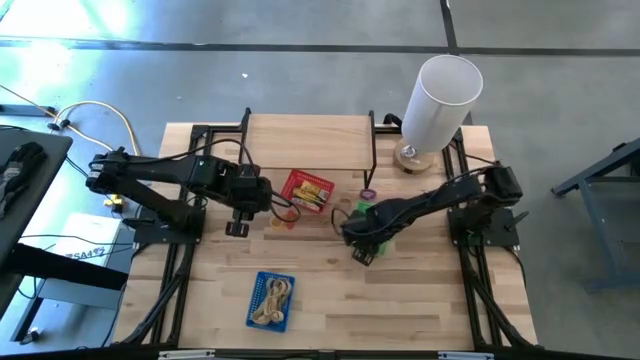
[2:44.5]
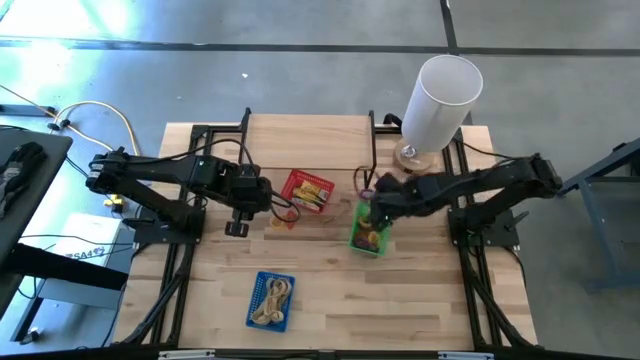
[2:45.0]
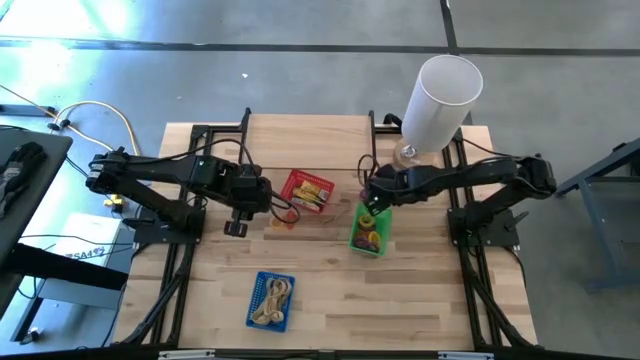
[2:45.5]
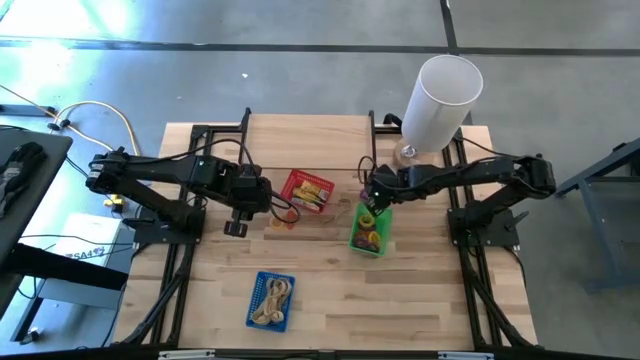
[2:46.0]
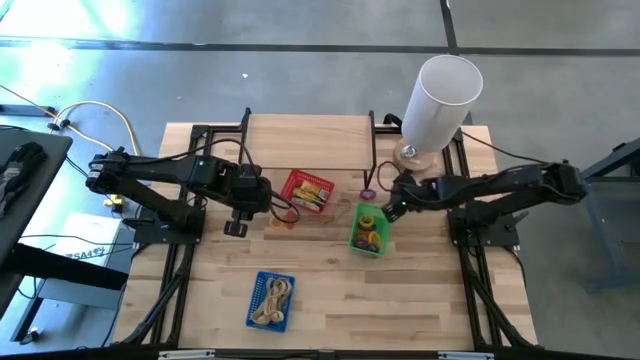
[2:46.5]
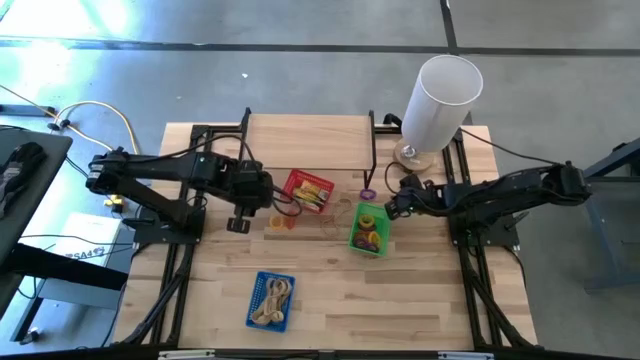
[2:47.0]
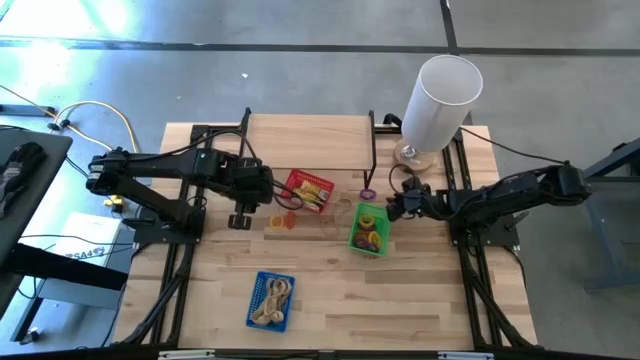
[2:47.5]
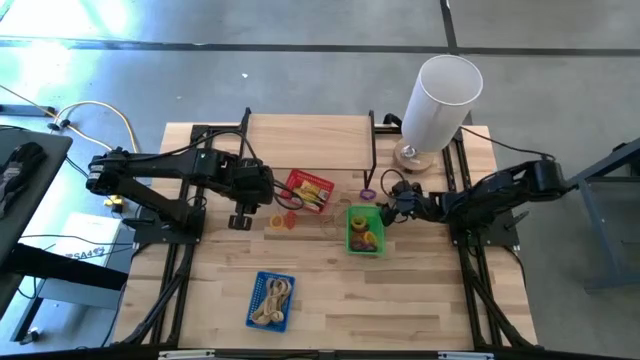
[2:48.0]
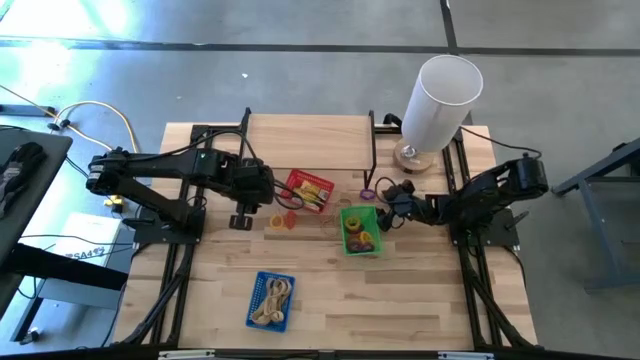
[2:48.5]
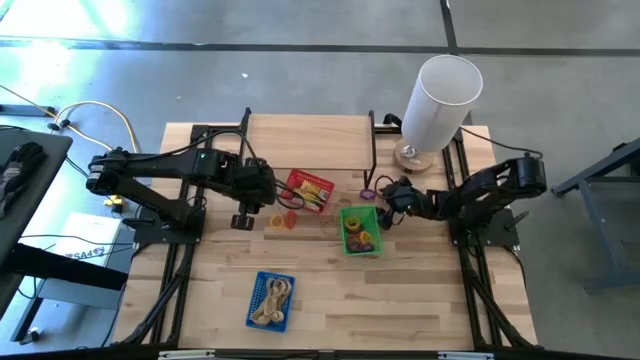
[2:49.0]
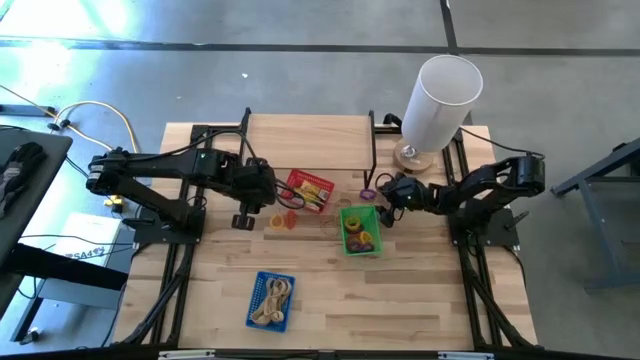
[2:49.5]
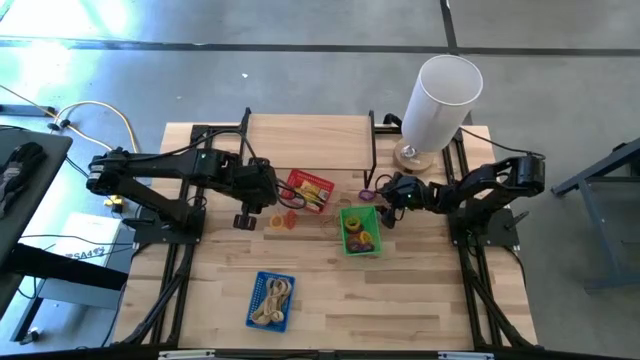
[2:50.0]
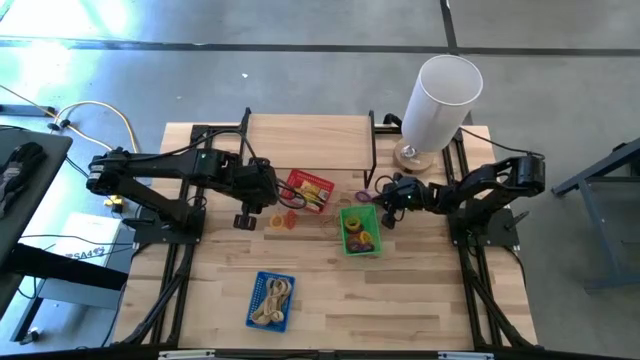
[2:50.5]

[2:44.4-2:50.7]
Task: Pick & Place Office Desk Supplies
Put the violet spring keychain into the green bin

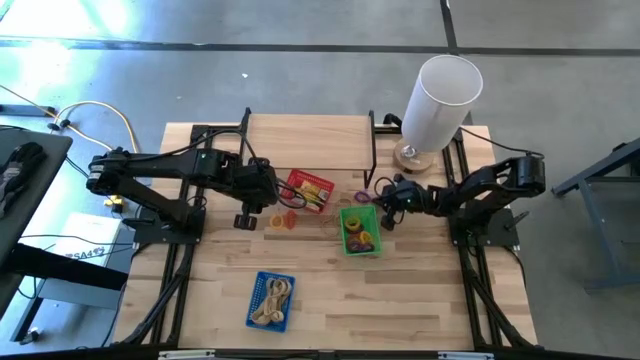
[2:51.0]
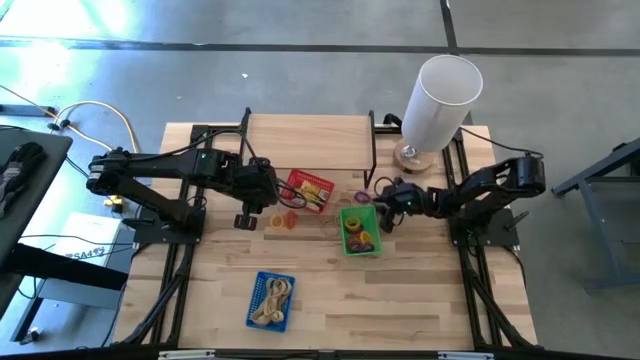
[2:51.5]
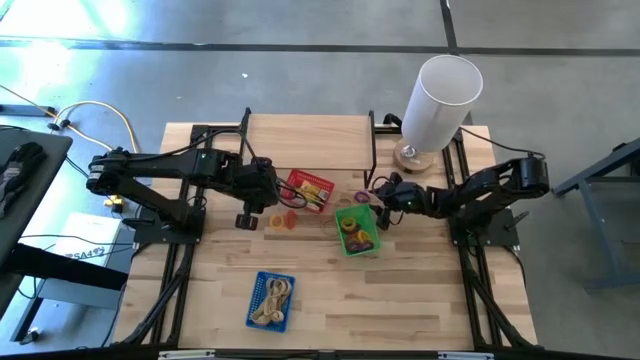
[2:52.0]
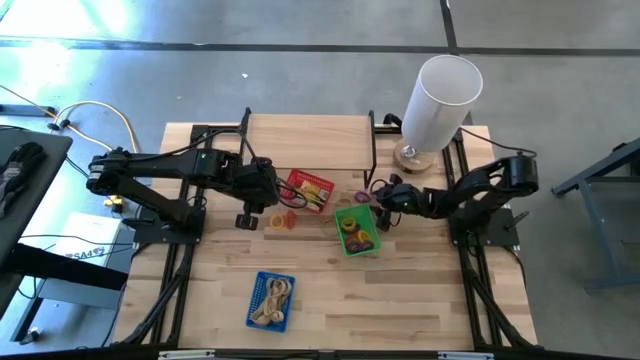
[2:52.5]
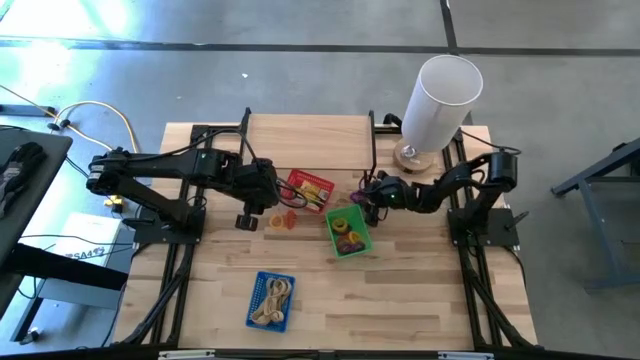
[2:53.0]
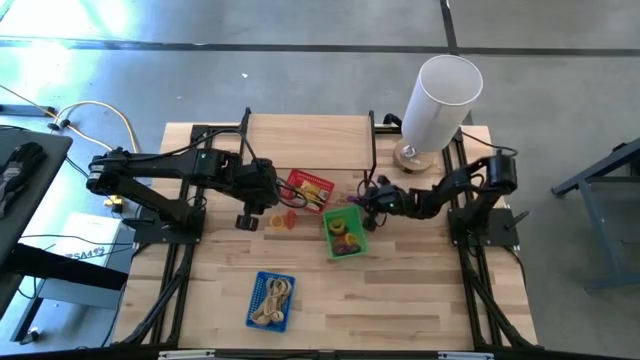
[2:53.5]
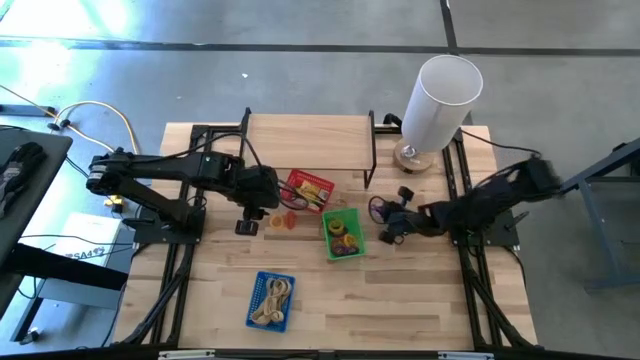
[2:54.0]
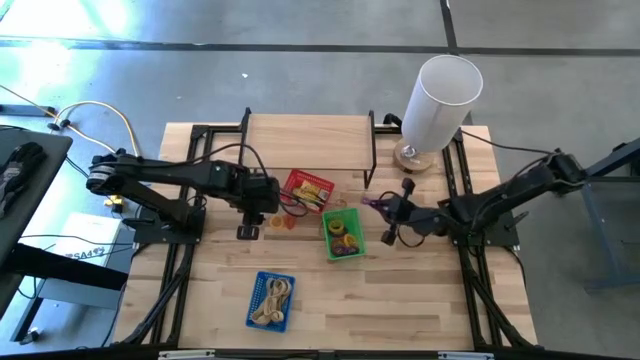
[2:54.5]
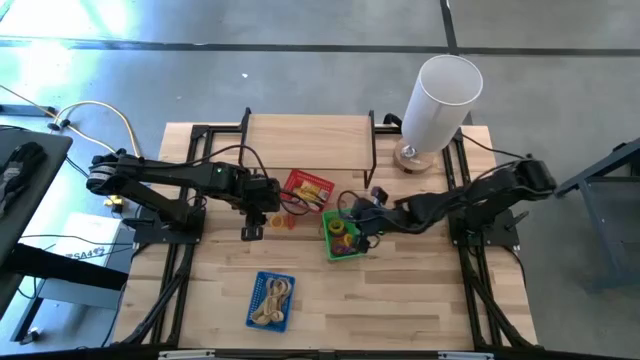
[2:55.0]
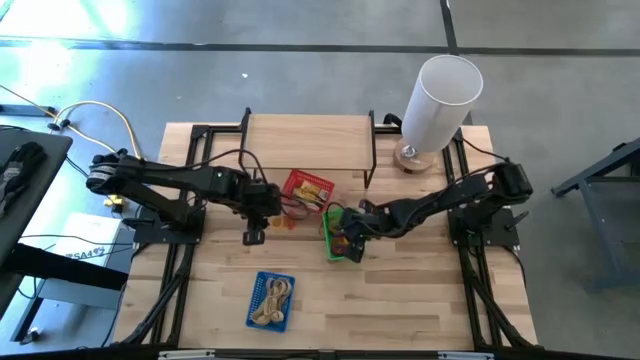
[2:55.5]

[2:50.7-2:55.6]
Put the violet spring keychain into the green bin

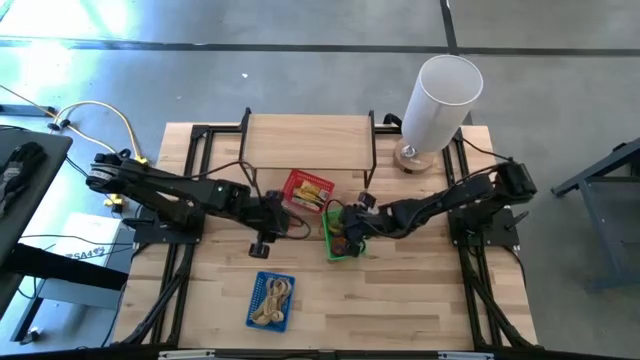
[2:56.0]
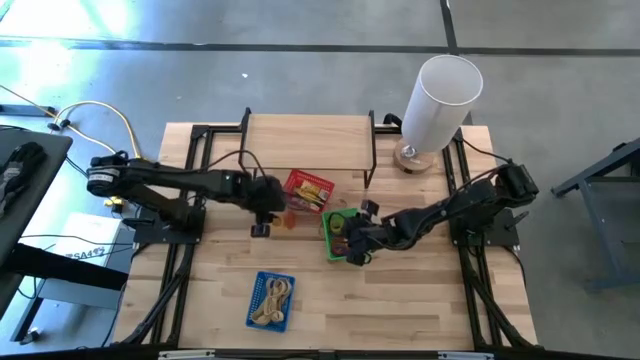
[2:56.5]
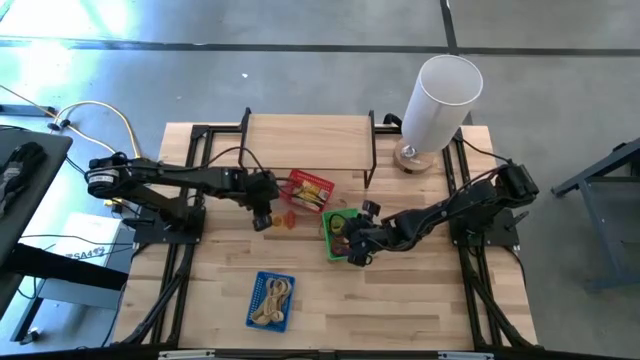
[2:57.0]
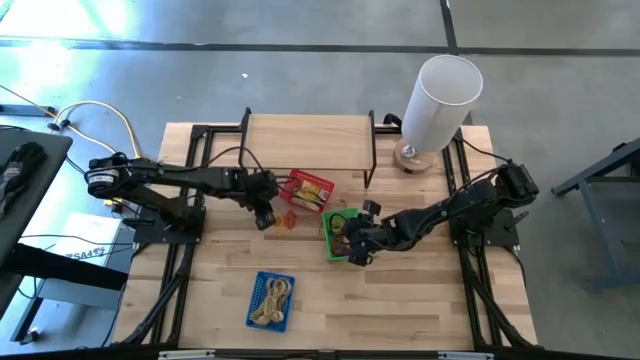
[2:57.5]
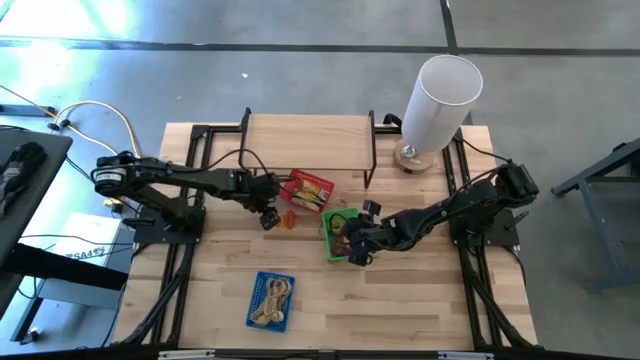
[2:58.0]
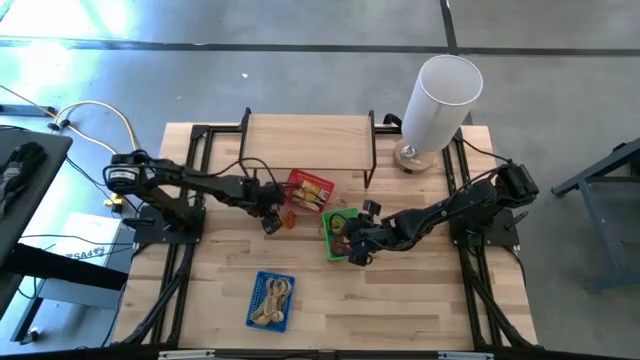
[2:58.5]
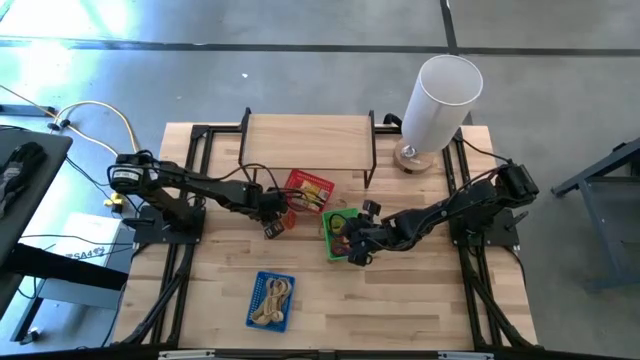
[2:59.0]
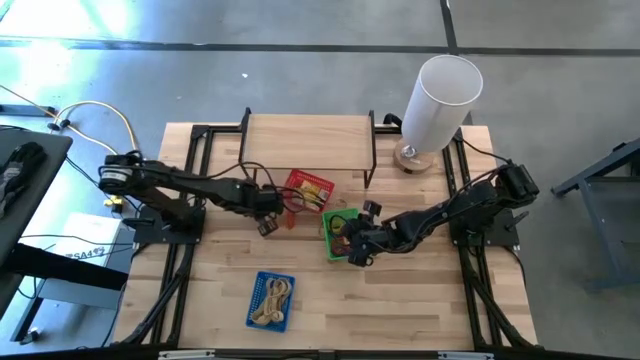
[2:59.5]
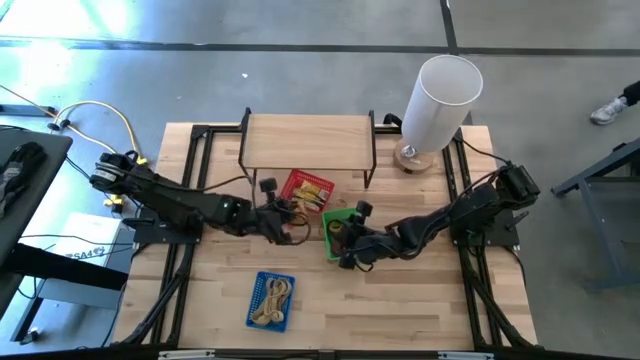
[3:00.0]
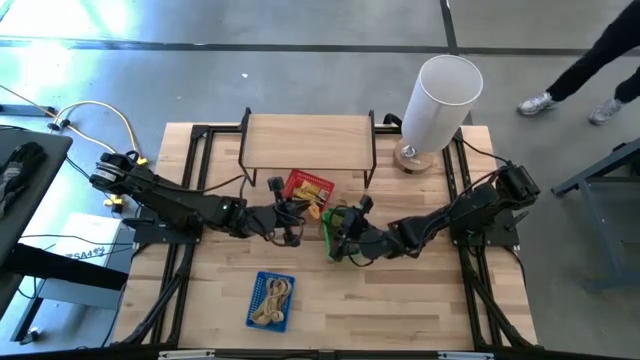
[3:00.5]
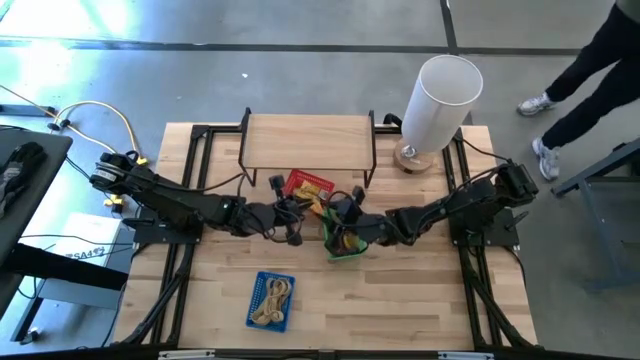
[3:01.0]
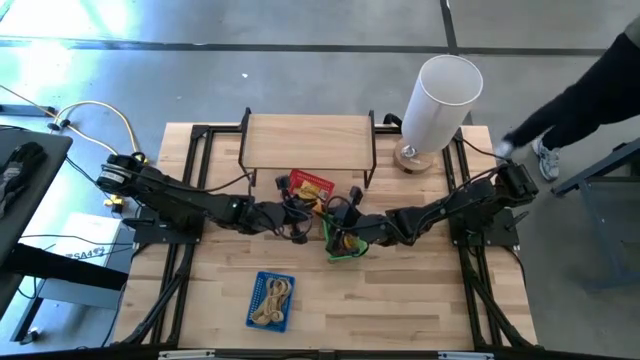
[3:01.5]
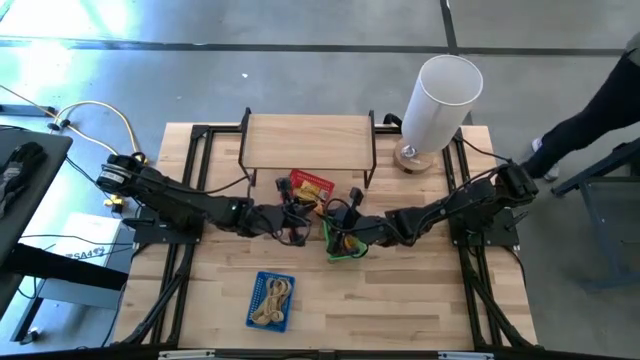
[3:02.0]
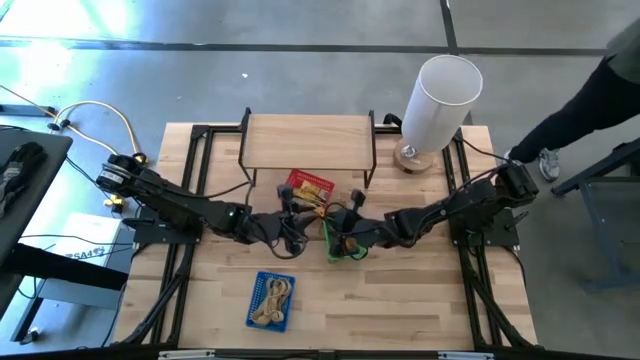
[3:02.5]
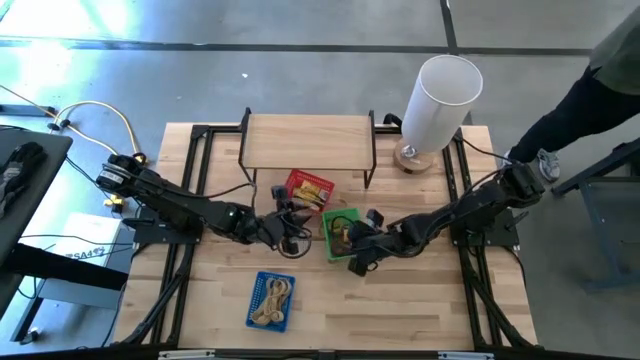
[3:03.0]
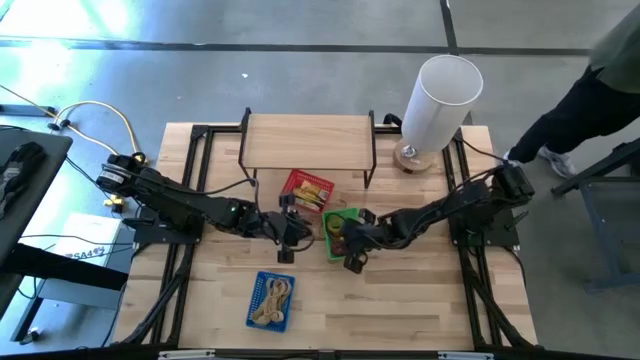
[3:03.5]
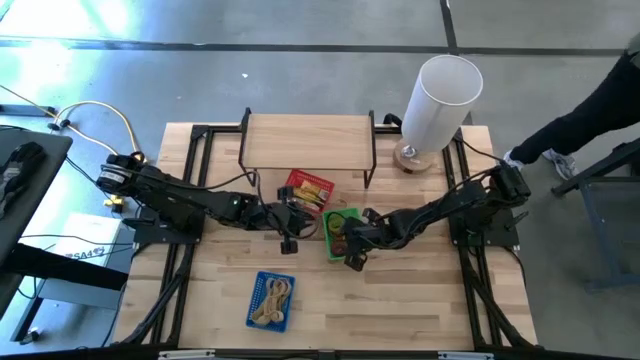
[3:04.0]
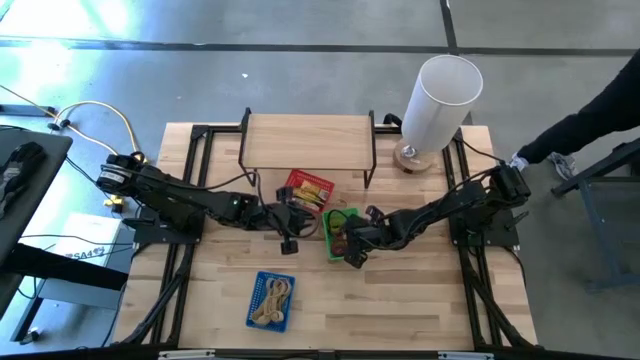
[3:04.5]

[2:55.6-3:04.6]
Put the yellow spring keychain into the green bin
